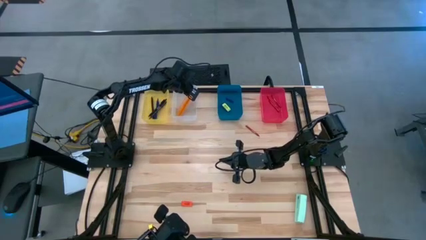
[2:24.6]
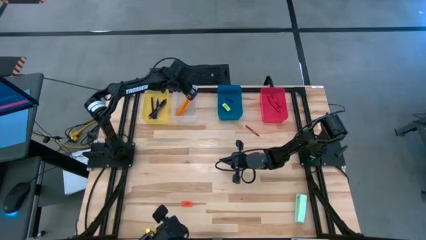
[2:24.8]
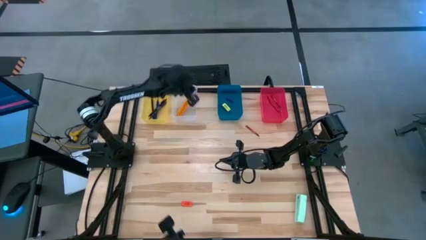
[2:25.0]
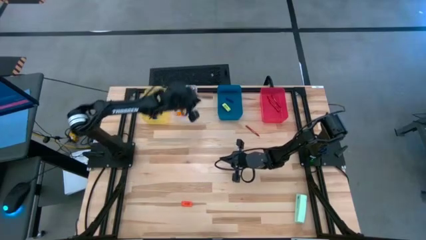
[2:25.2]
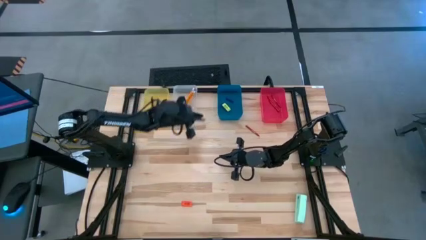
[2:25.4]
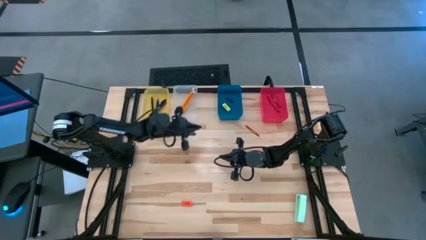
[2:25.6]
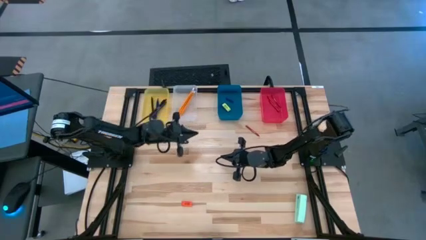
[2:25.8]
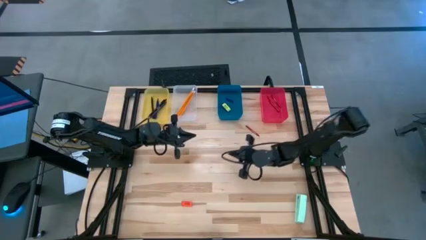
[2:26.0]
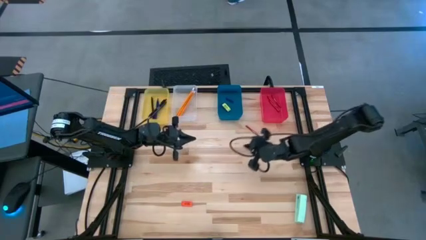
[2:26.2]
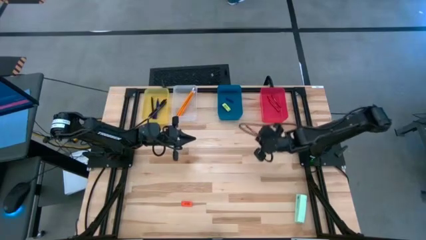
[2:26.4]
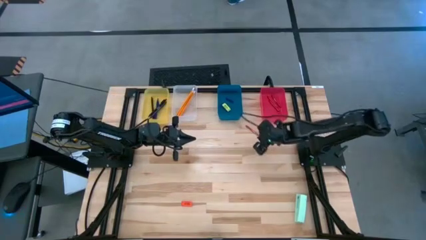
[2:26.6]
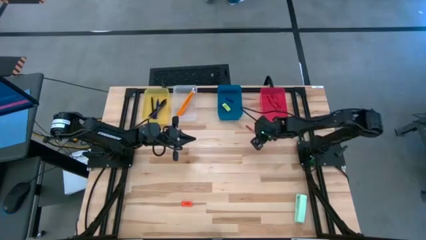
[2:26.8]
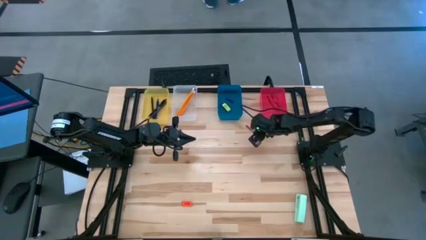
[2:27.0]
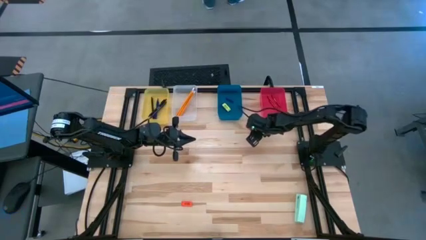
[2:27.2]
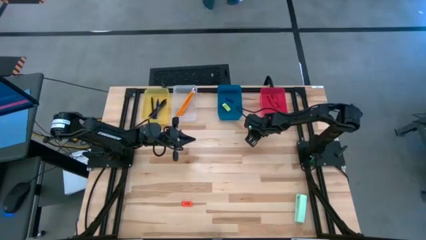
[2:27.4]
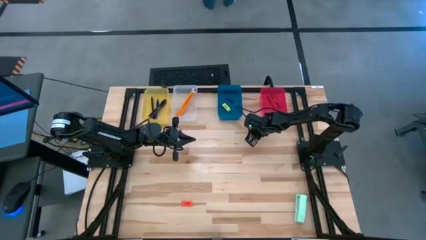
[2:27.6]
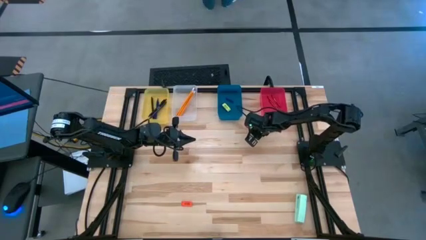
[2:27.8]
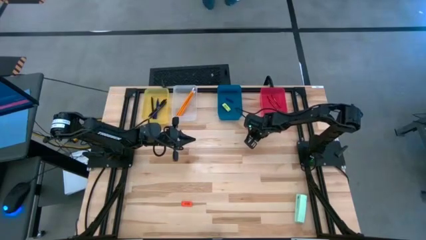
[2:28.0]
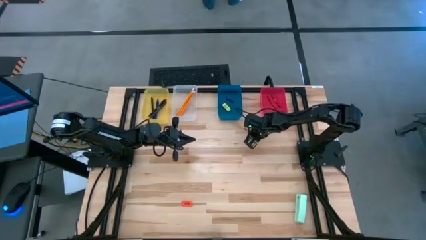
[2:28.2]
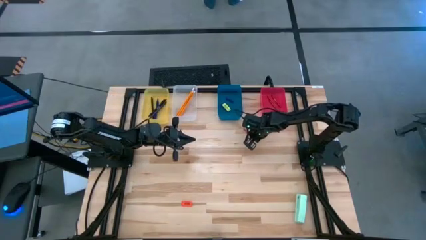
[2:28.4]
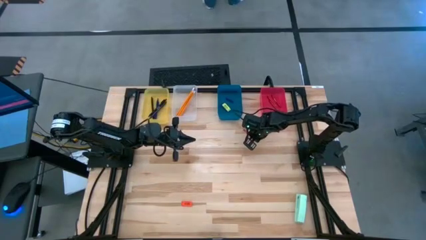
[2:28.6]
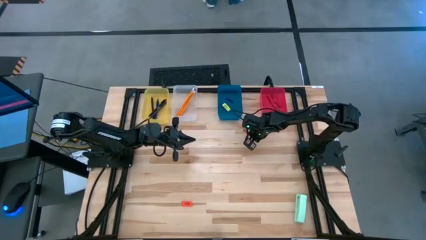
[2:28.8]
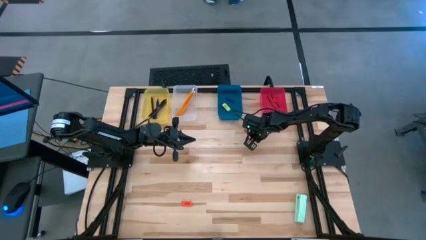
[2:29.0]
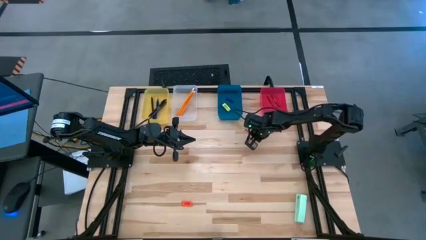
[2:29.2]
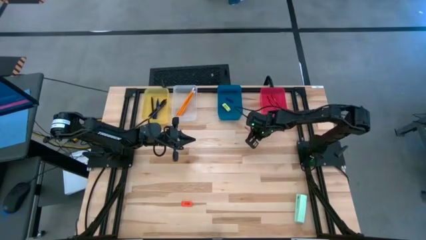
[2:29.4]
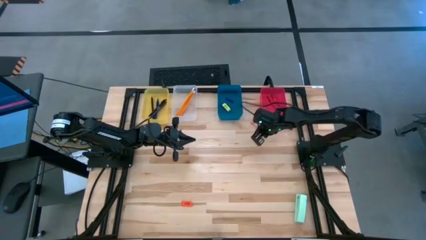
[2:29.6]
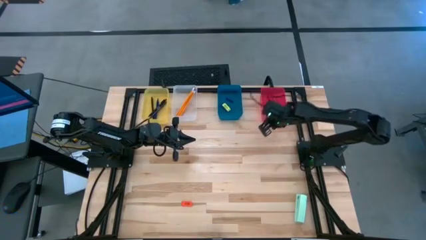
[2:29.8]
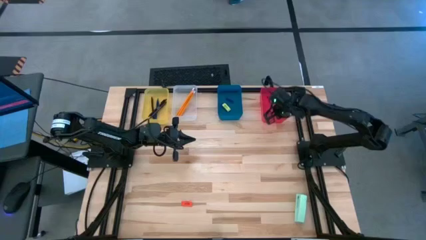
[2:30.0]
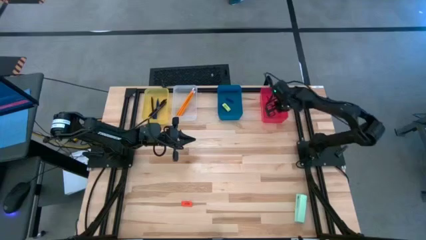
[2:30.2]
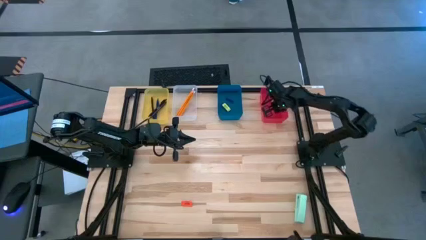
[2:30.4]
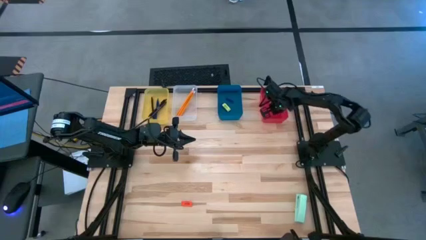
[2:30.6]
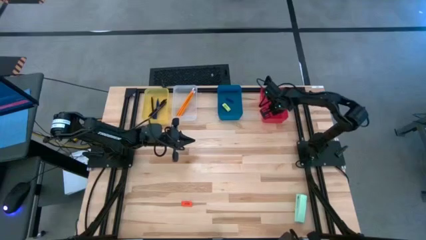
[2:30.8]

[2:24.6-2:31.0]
Task: Sort crayons/erasers/pens/pencils in bins
Put the red crayon into the red bin

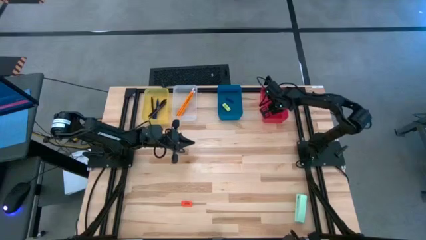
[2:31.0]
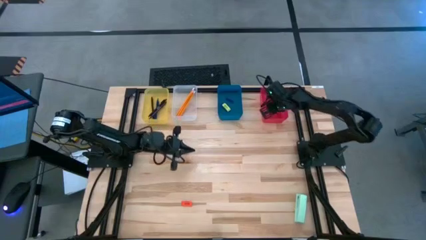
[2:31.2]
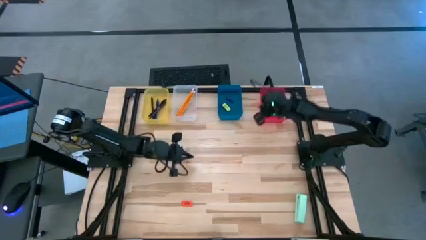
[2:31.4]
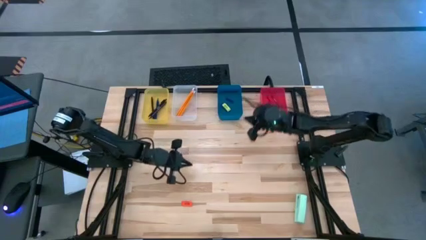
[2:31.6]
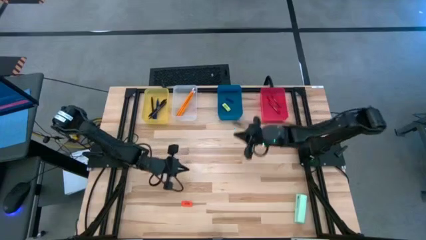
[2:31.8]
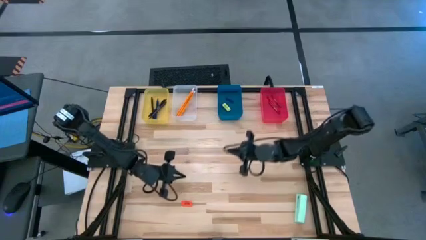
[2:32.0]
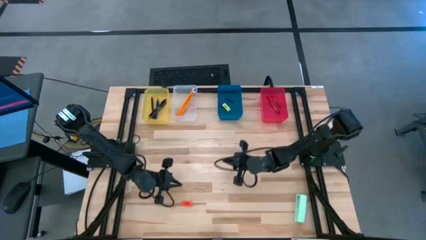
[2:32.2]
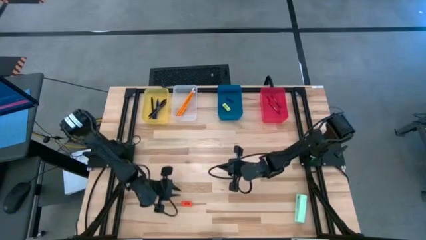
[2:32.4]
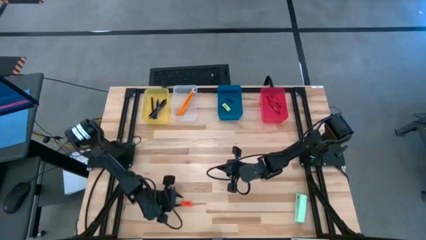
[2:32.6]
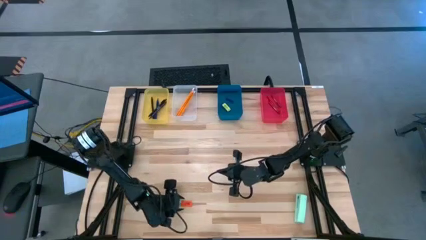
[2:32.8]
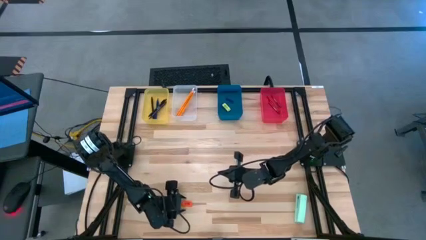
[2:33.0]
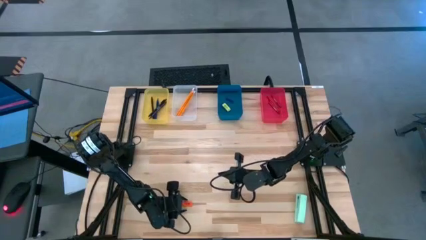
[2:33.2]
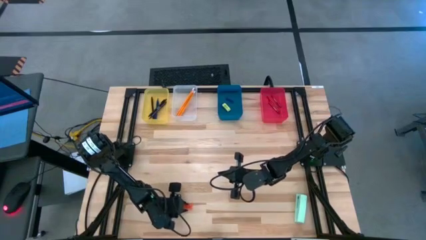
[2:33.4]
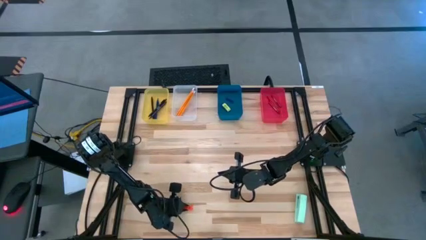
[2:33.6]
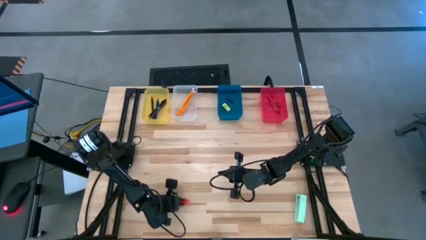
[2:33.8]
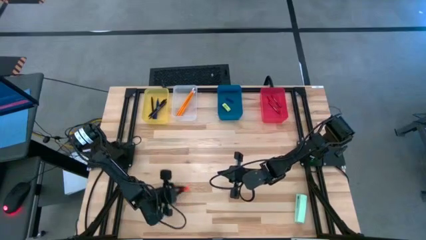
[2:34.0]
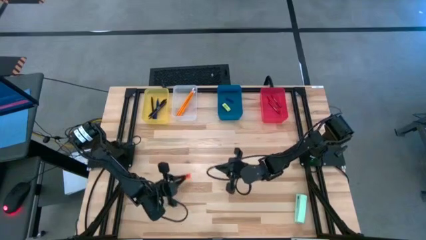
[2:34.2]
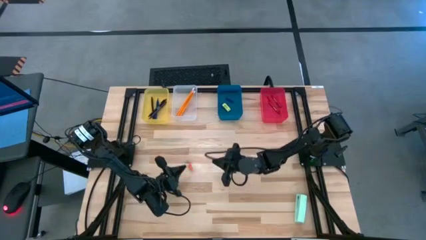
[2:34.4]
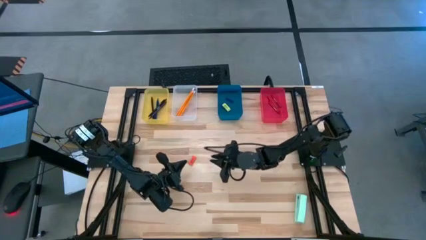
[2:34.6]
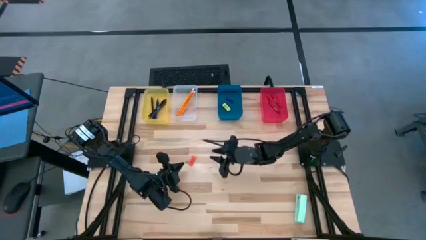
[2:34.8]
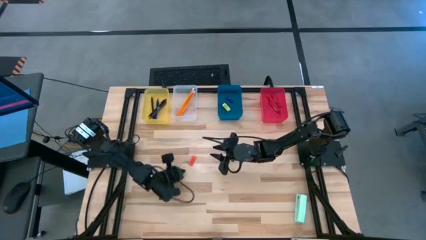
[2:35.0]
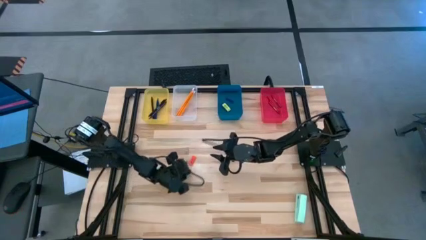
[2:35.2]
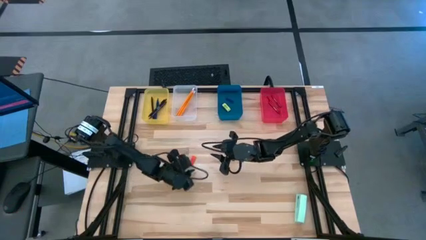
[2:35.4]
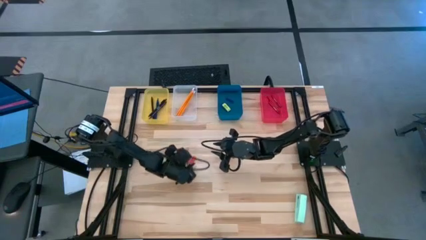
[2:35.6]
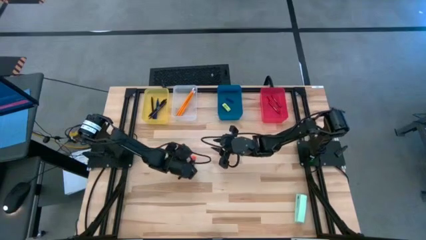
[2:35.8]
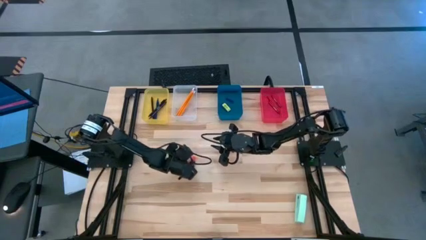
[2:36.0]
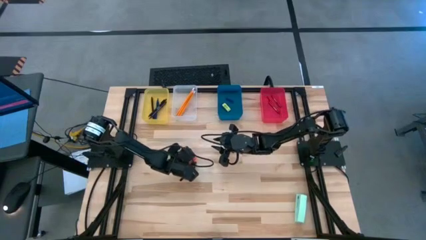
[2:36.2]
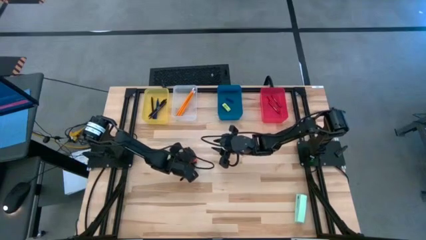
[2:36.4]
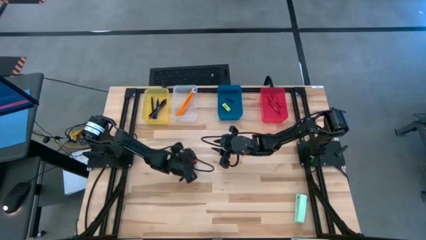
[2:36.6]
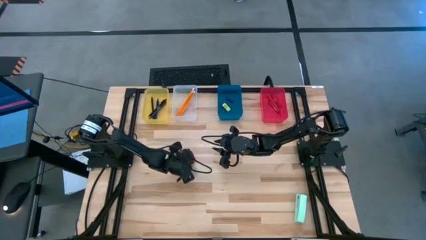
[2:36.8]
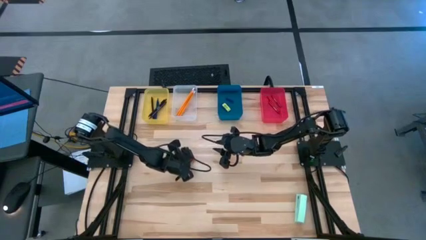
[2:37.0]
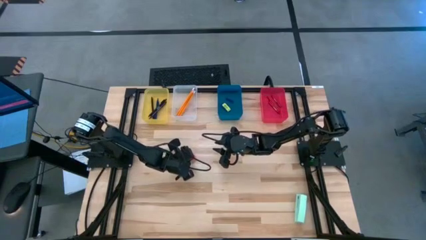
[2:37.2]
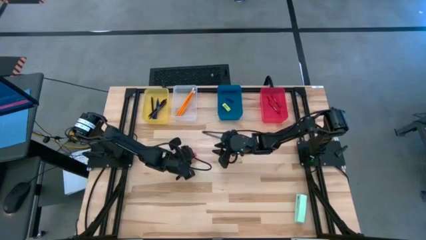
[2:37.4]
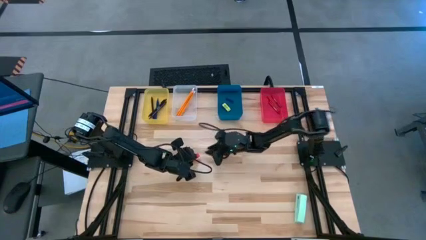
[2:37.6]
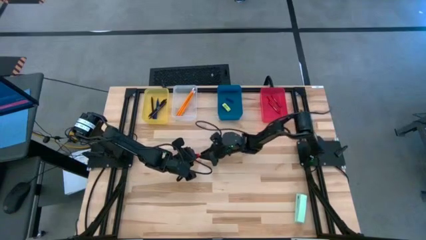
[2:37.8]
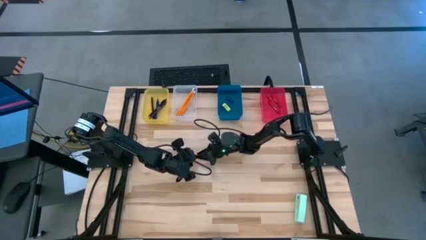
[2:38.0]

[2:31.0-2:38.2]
Put the orange eraser into the blue bin
